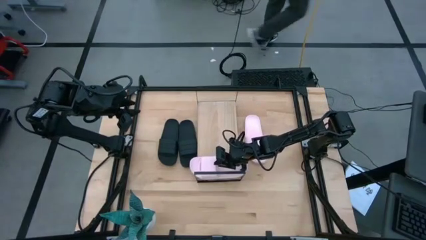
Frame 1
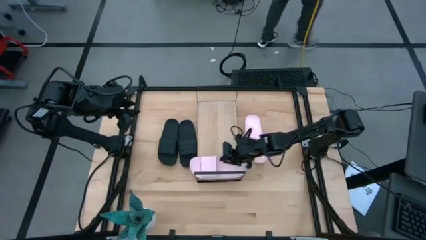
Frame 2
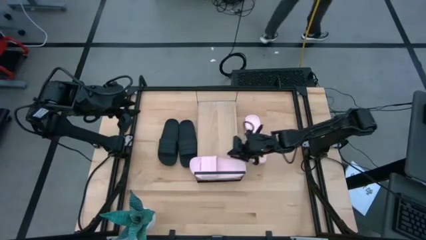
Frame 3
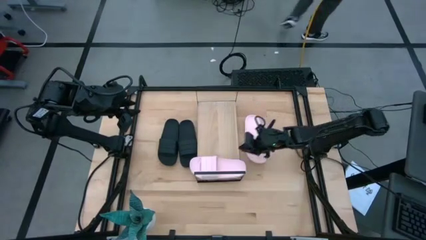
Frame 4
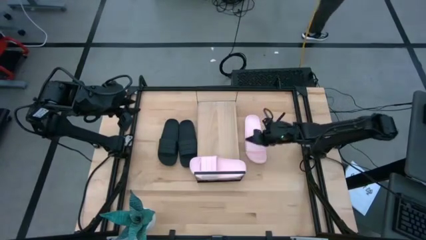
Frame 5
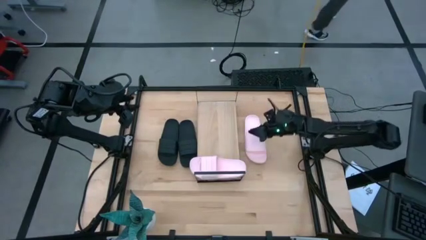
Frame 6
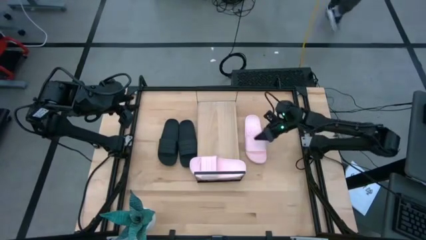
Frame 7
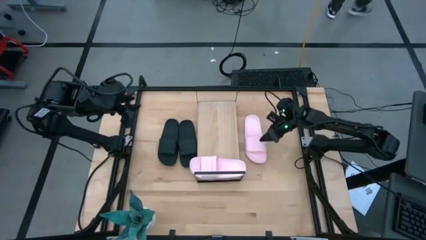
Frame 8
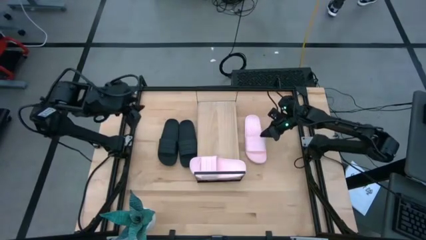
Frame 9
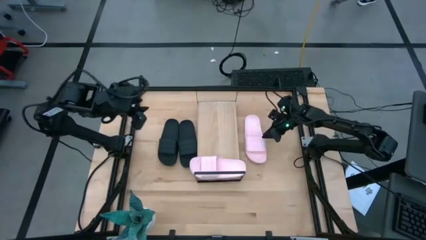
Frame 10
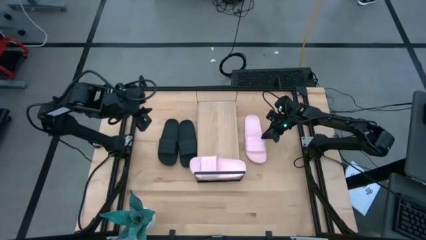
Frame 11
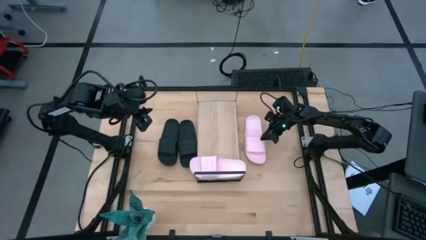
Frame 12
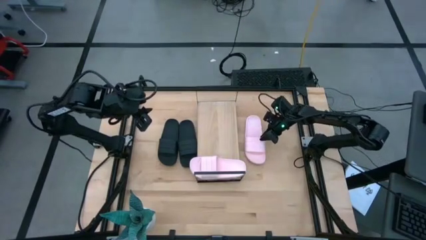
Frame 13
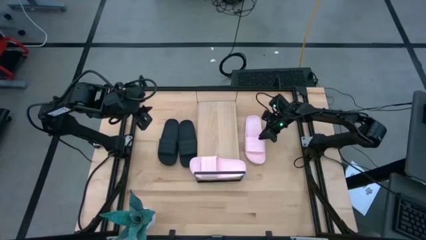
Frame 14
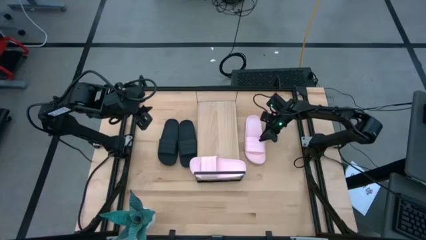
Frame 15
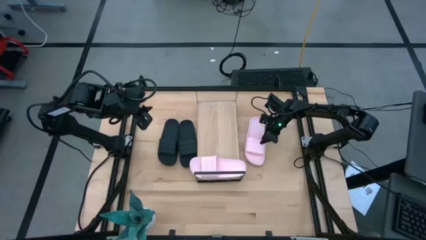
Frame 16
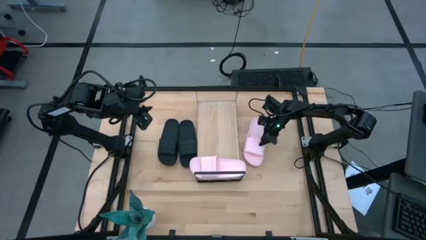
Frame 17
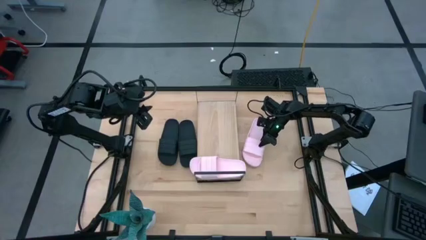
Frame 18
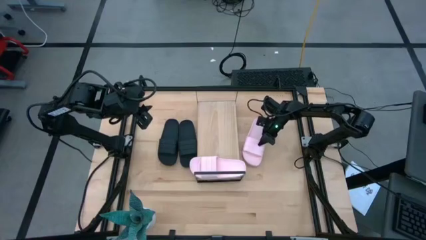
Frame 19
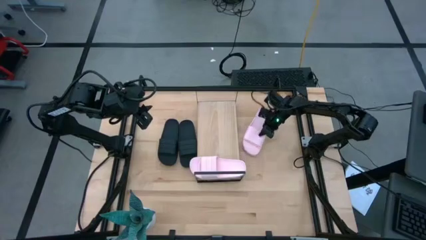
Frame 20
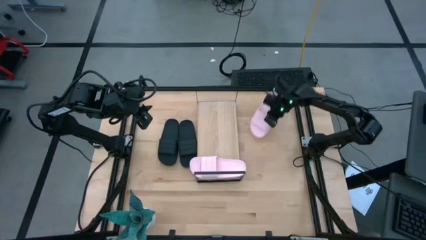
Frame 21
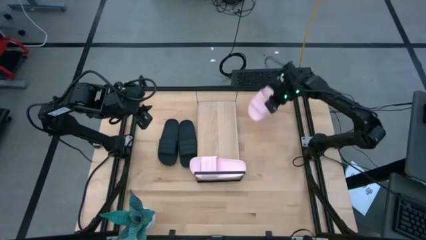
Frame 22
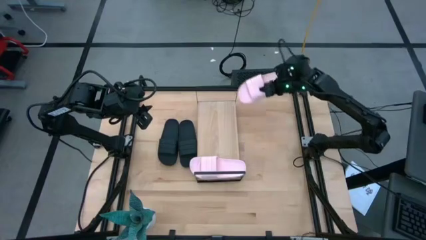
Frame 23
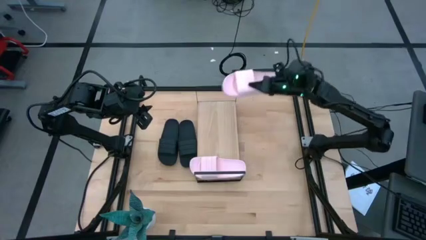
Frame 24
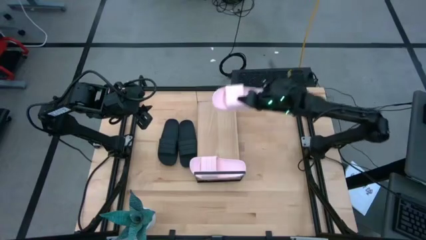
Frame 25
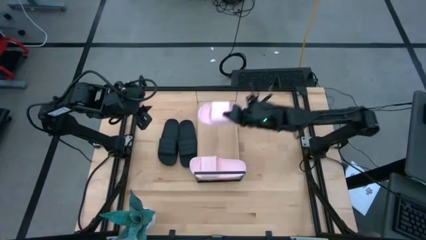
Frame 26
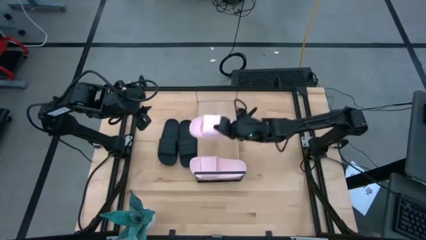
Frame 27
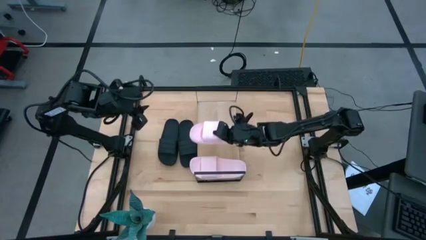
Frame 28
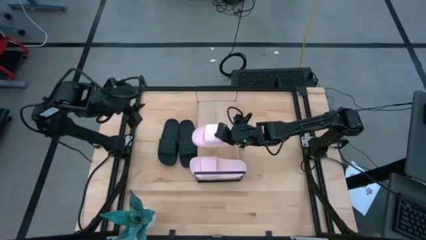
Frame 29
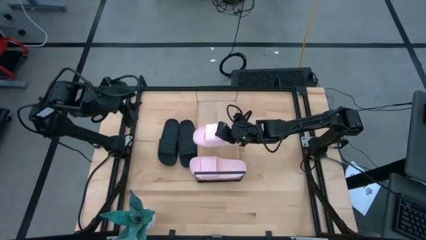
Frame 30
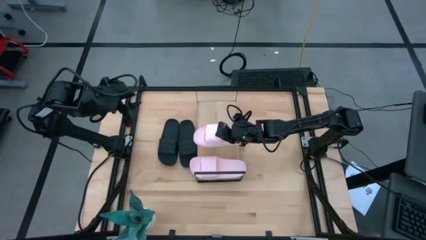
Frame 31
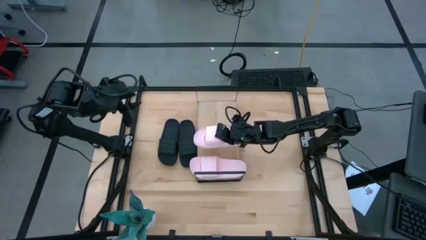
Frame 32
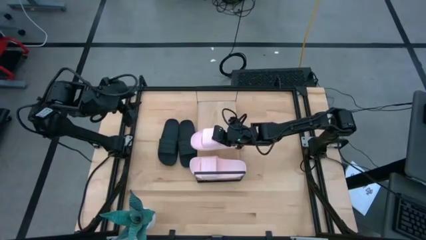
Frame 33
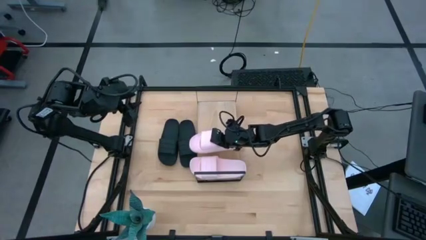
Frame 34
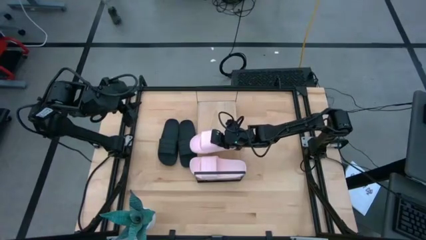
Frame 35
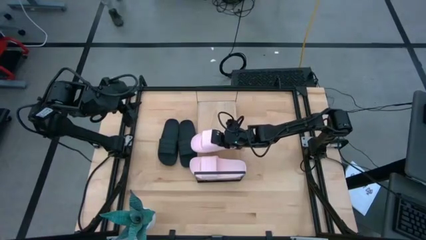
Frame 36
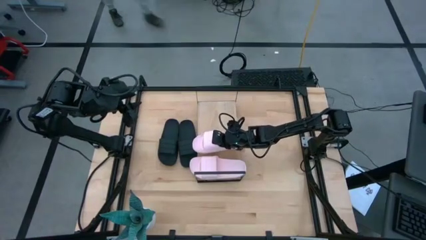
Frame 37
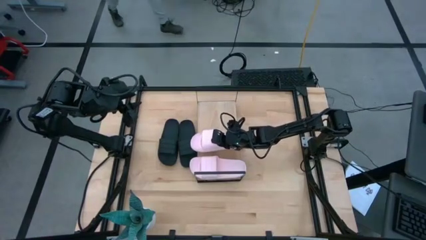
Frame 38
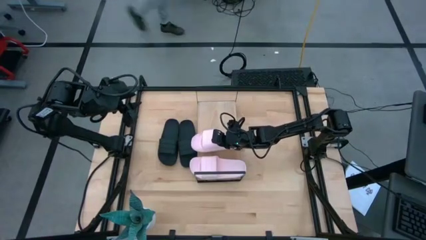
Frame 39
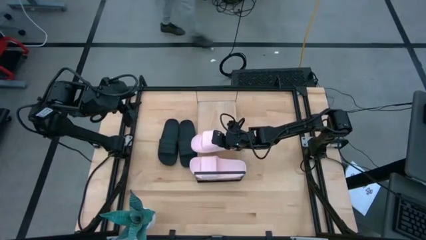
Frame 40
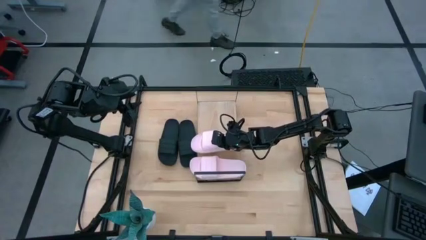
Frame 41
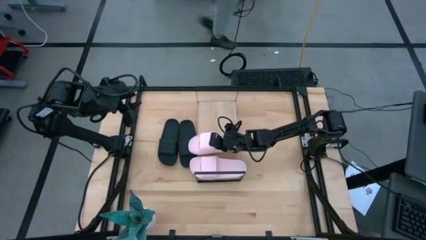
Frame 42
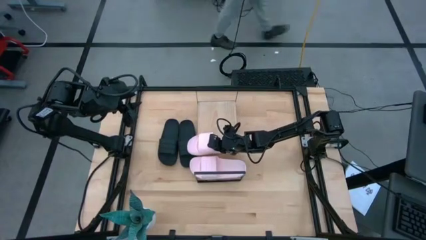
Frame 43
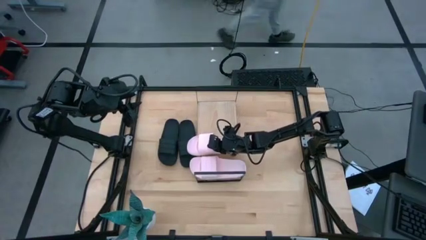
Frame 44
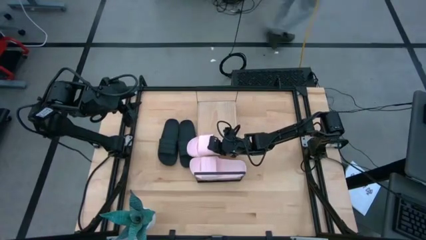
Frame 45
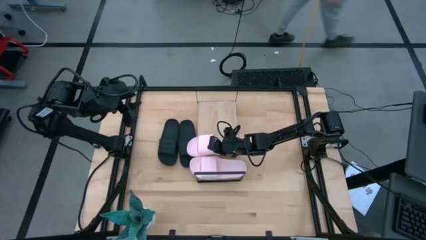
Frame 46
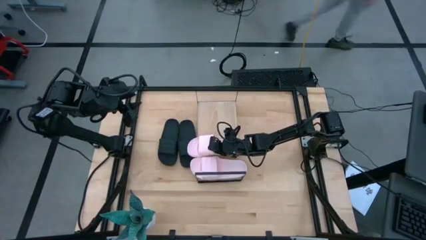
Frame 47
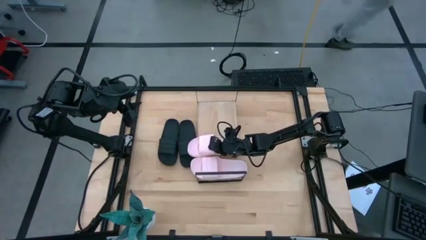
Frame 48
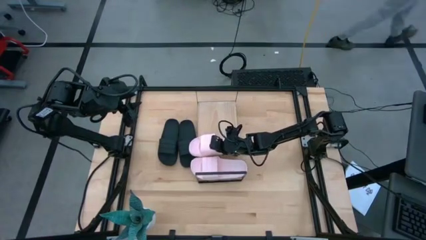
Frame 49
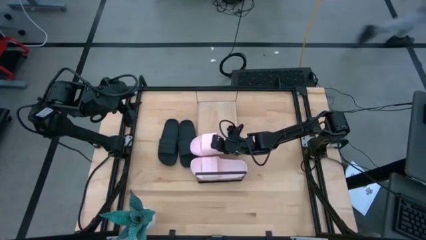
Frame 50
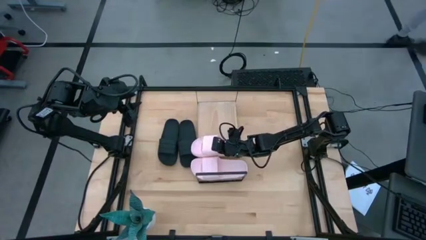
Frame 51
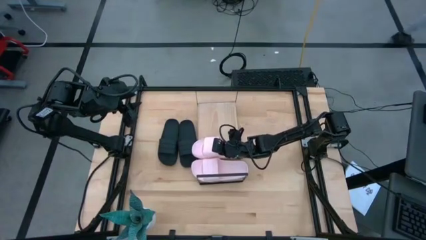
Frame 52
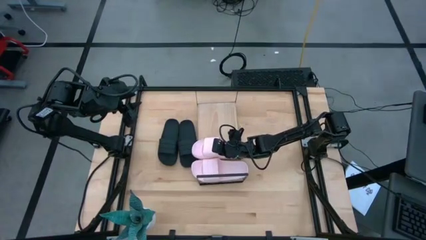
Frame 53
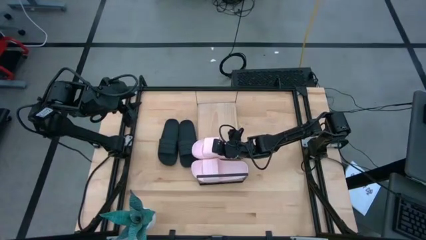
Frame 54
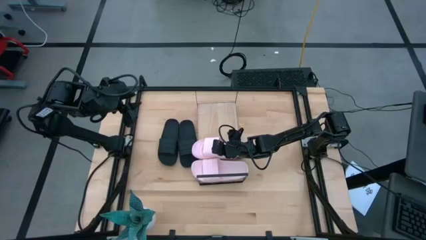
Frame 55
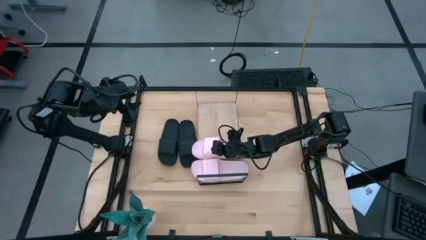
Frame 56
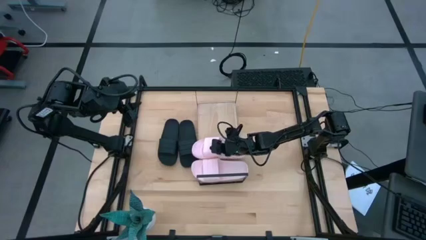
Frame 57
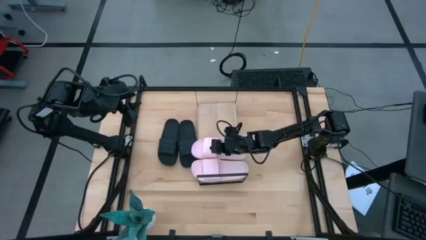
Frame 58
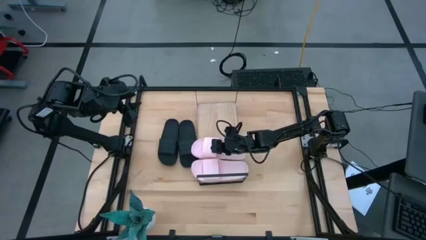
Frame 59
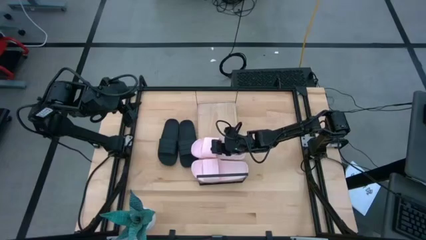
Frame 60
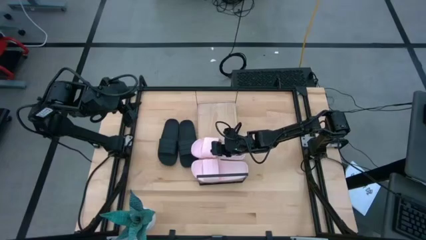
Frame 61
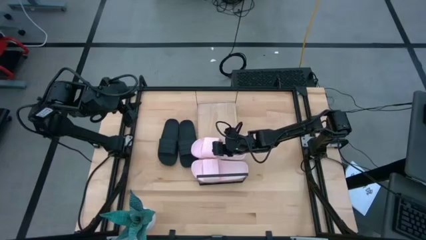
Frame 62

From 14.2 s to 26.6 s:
Task: Pick and place slides into the shelf
Put the pink slipper on the shelf

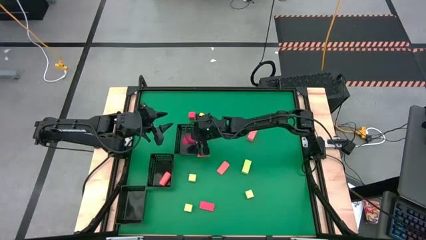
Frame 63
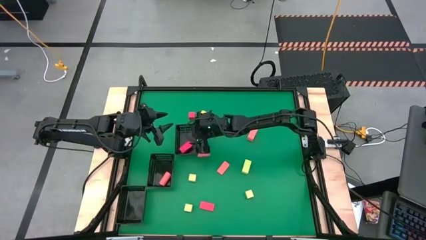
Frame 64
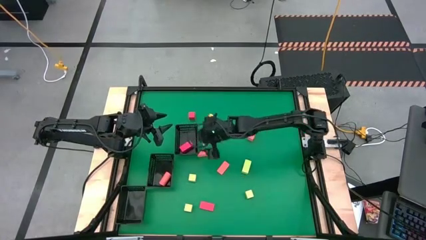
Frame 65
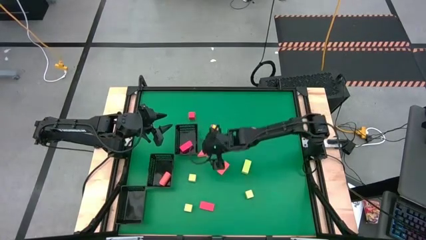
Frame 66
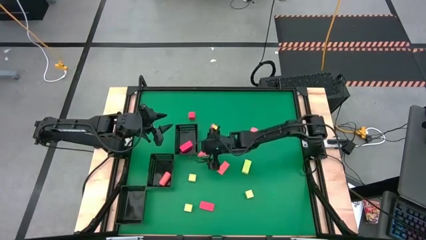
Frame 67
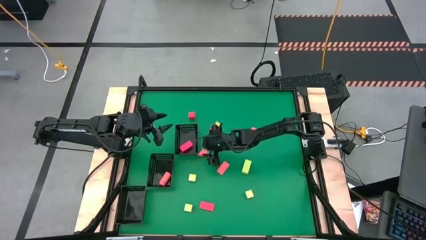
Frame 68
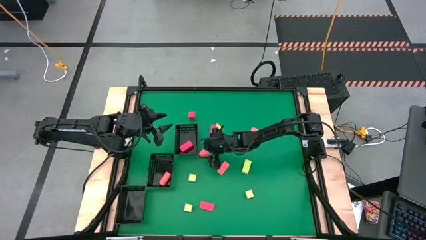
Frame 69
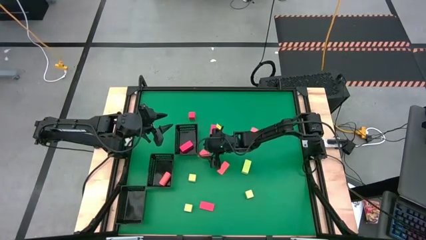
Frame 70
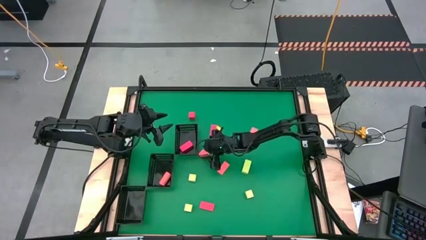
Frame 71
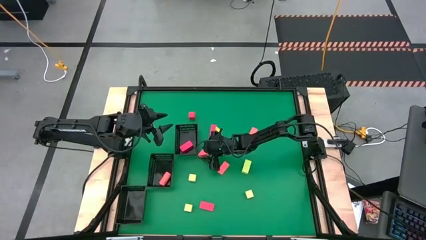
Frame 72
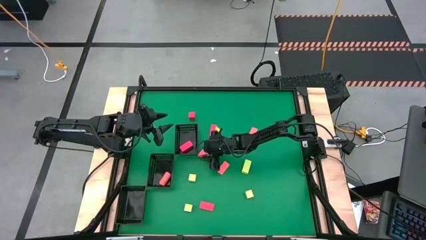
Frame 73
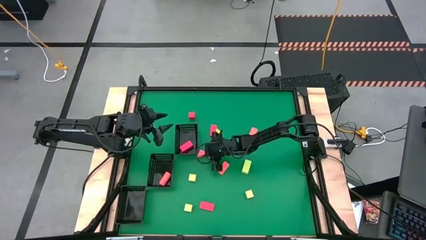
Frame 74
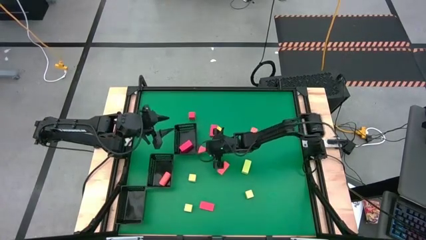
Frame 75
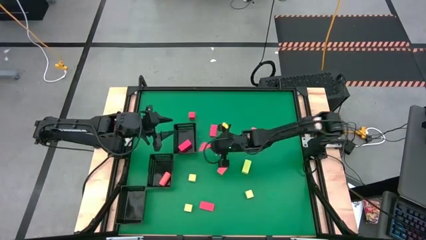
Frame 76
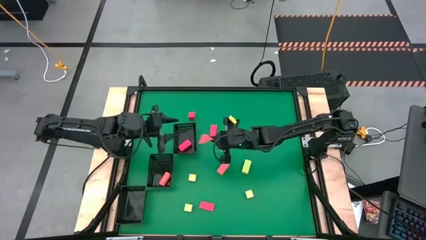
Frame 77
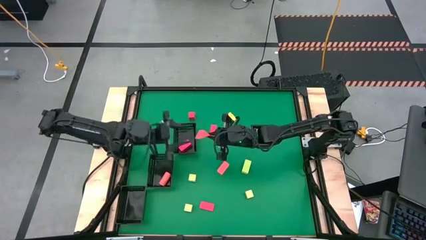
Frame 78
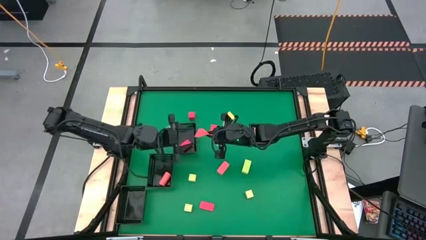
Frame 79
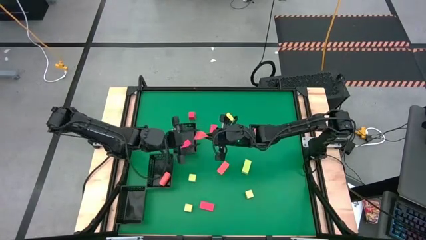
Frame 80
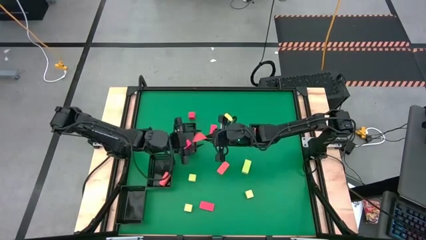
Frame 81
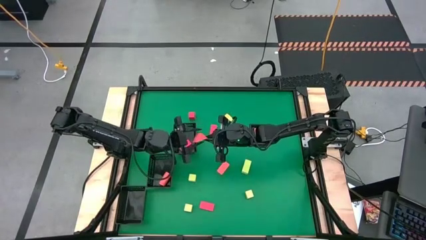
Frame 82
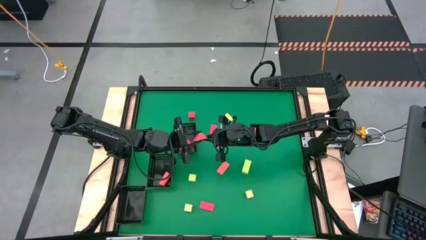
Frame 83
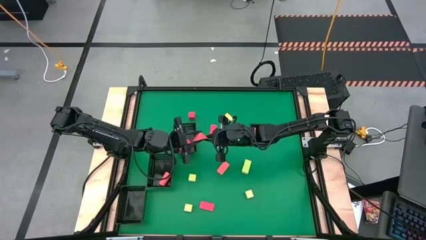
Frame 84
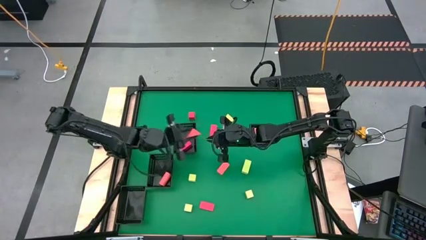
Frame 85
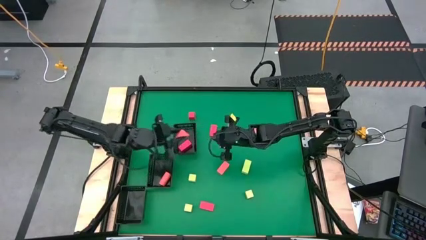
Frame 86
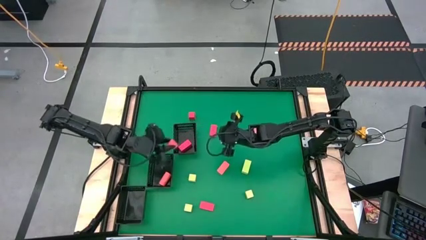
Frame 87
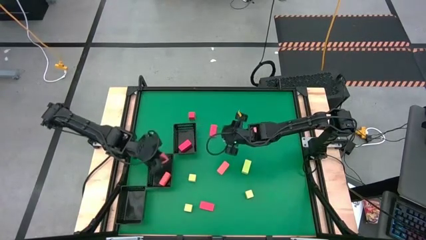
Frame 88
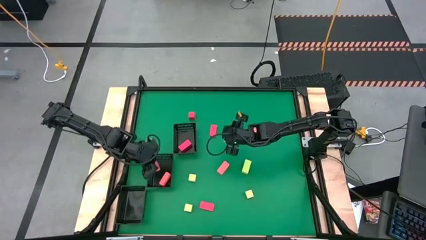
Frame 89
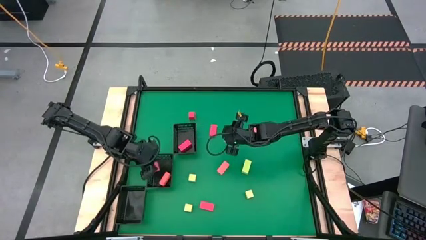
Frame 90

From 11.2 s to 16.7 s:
Task: Sort & place blocks by color
Put the orange block into the middle black bin
